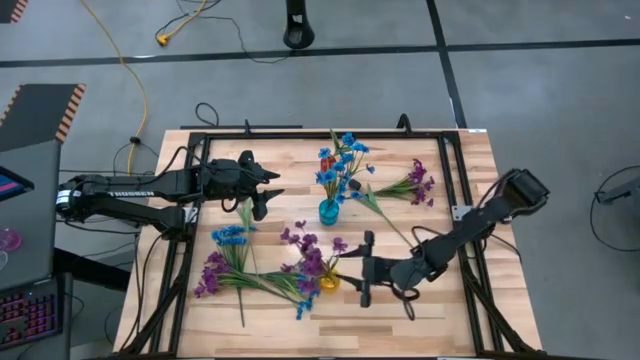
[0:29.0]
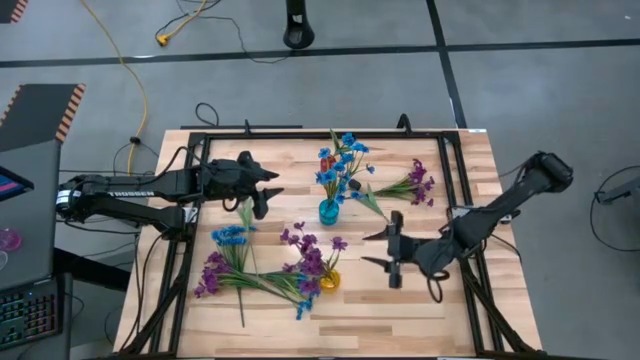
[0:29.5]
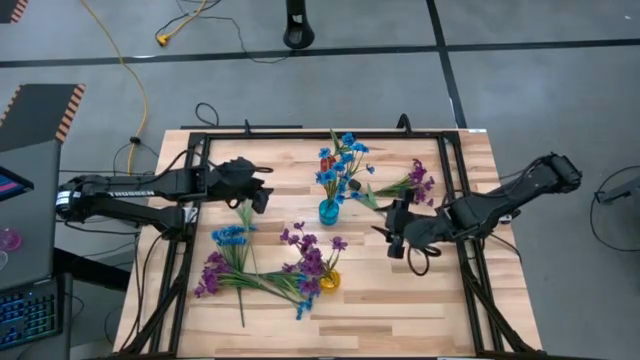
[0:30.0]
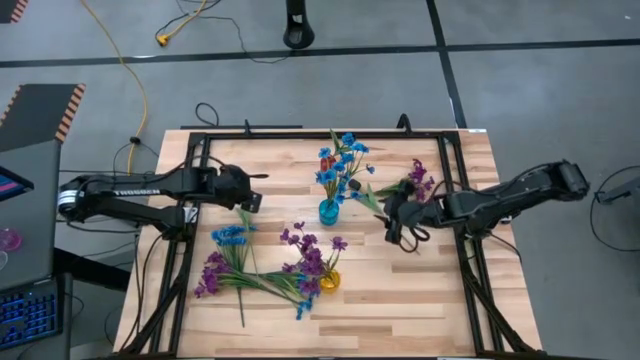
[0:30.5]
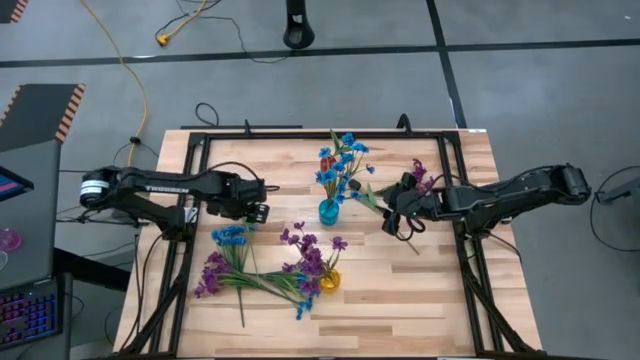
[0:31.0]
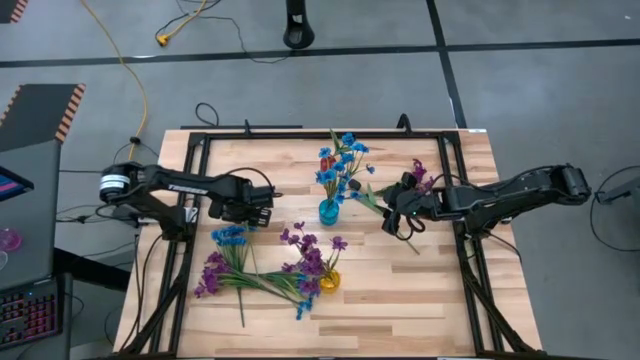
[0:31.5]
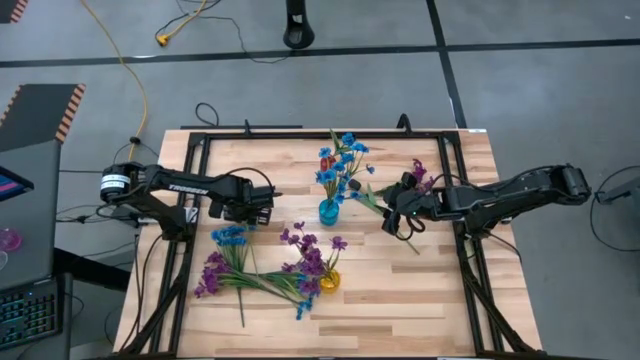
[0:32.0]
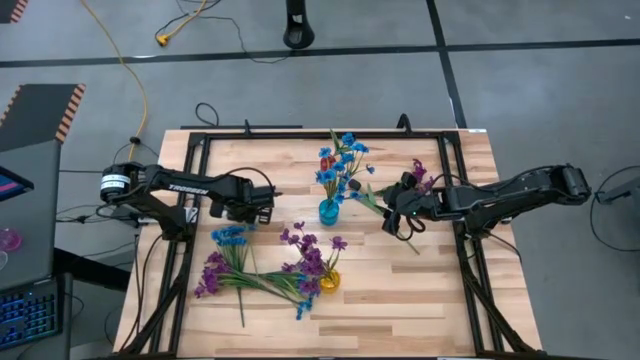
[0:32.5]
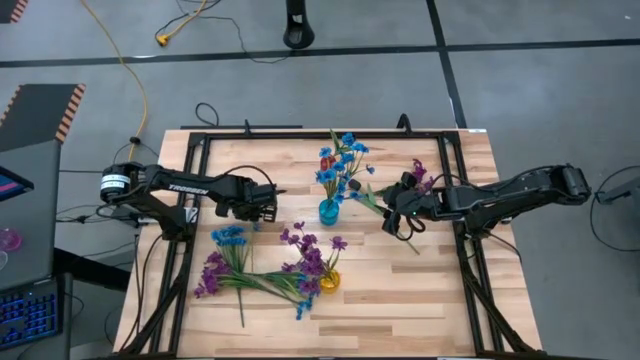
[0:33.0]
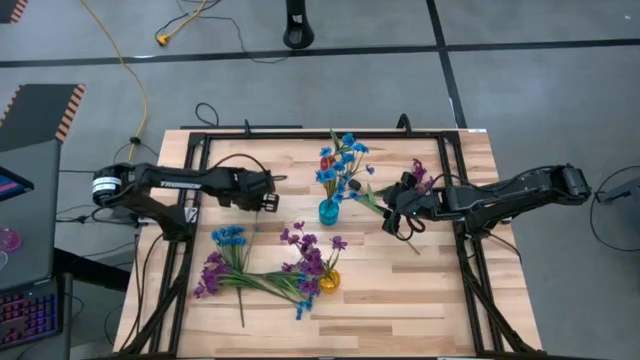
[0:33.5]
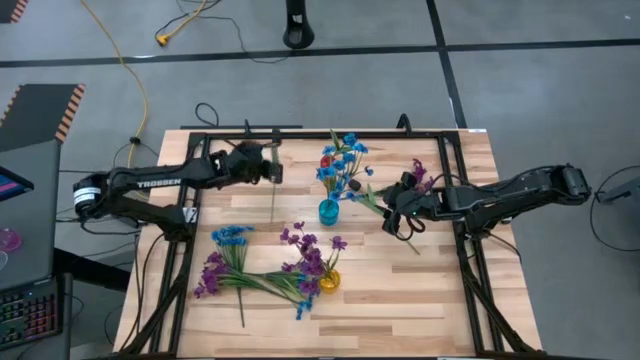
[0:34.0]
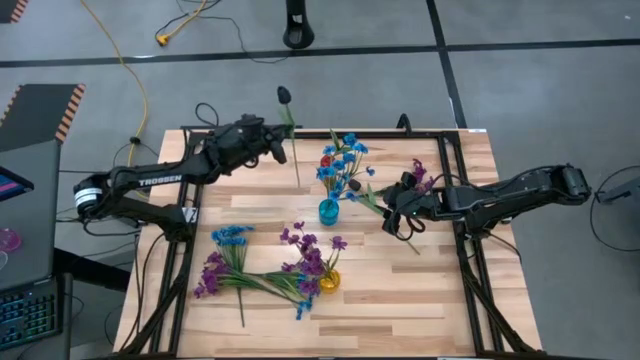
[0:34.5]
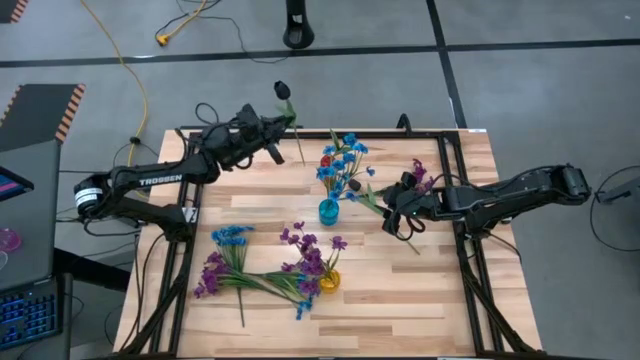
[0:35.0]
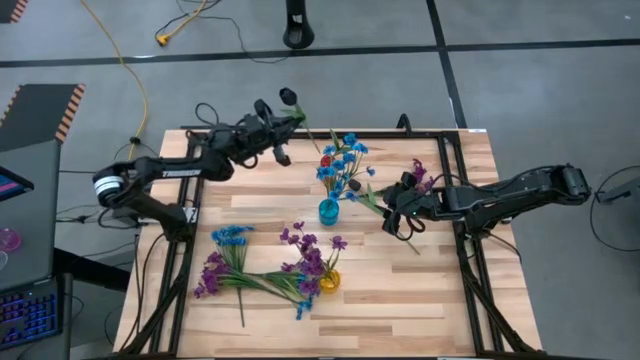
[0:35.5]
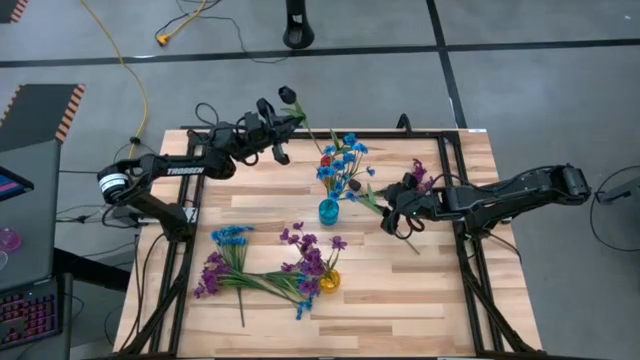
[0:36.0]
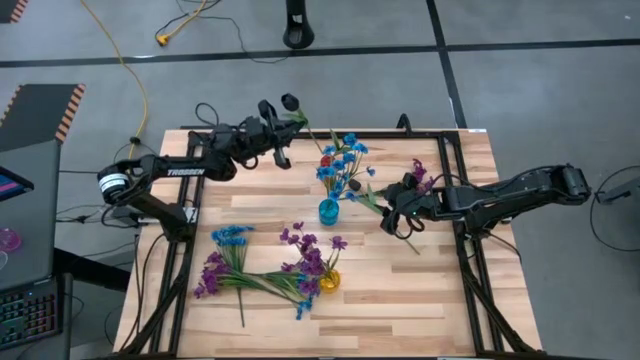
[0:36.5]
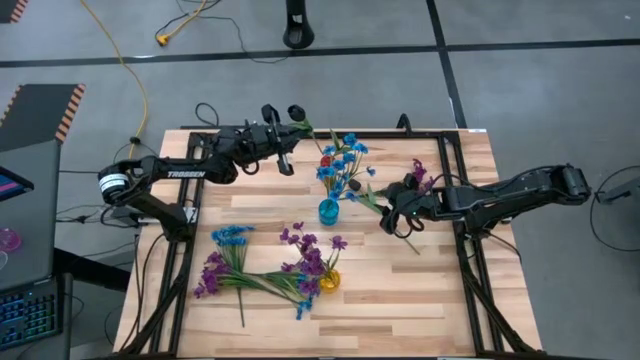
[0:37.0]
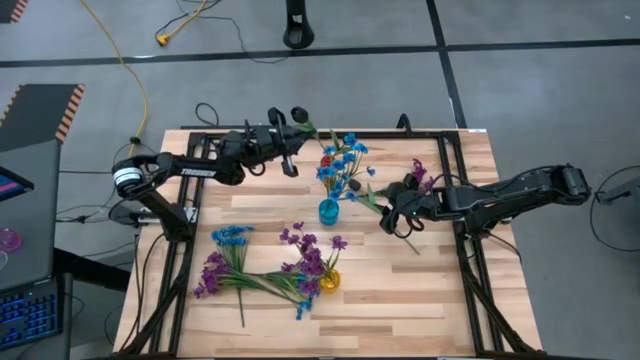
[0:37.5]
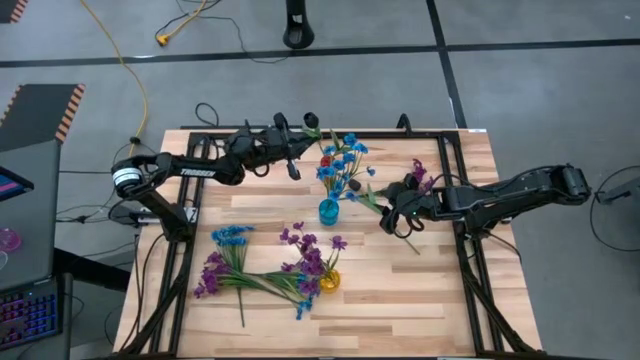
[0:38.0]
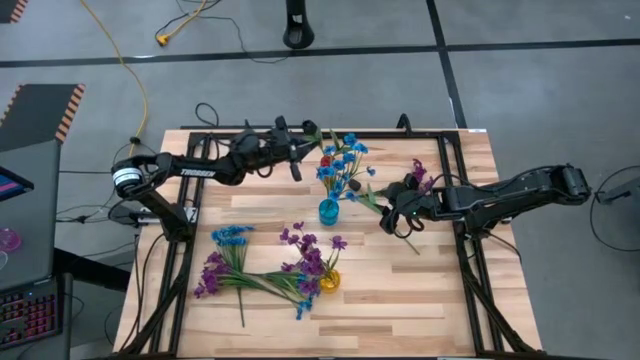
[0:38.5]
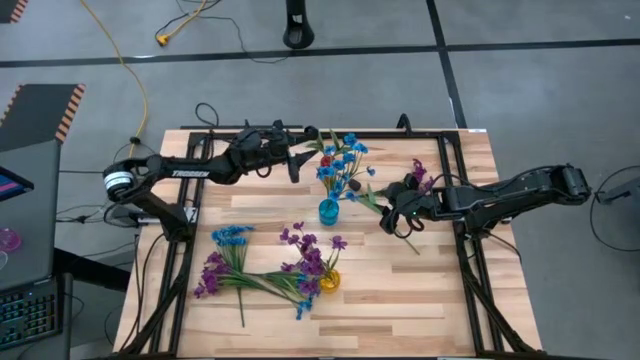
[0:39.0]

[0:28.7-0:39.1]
Task: Sort flowers into vase by color
Put the left black flower into the red crystal vase

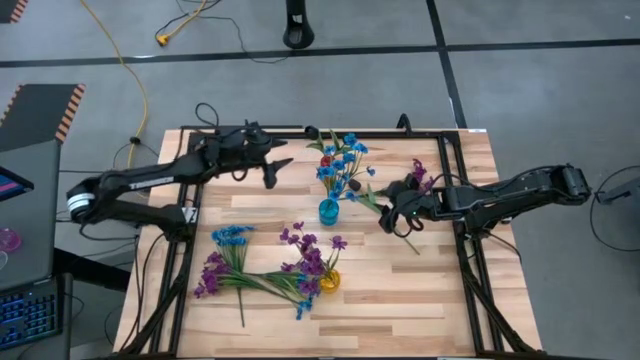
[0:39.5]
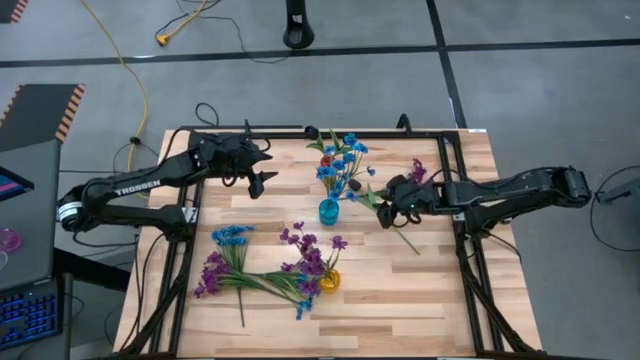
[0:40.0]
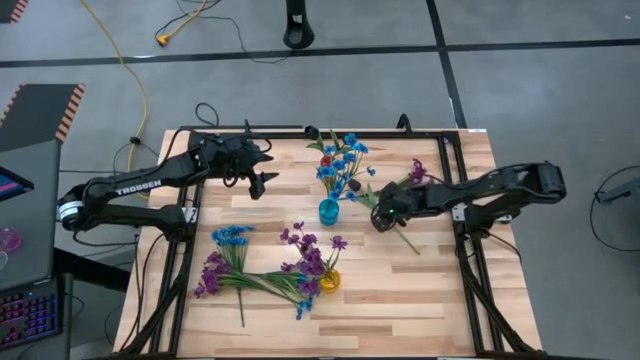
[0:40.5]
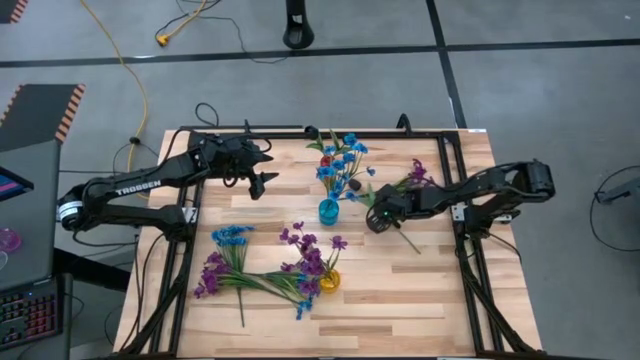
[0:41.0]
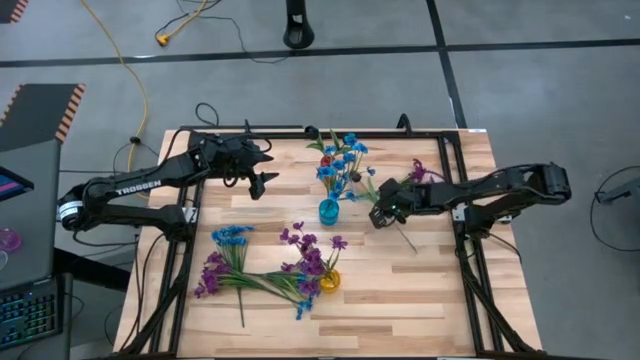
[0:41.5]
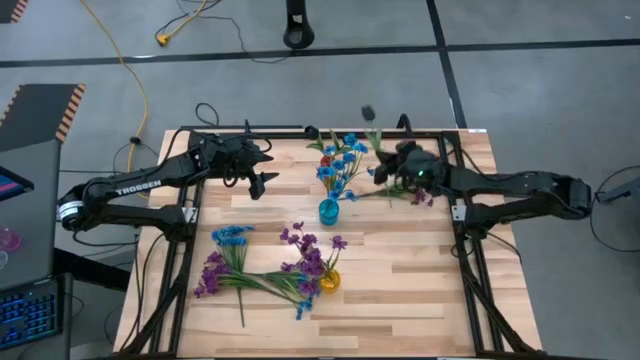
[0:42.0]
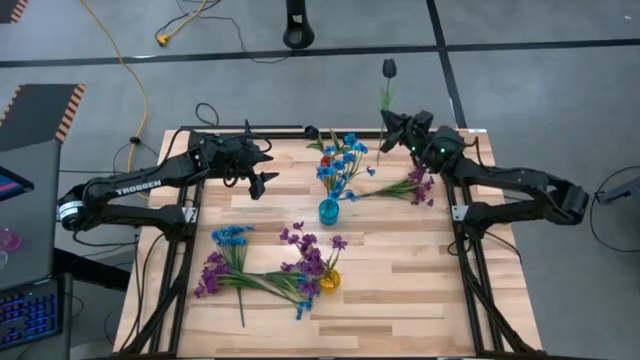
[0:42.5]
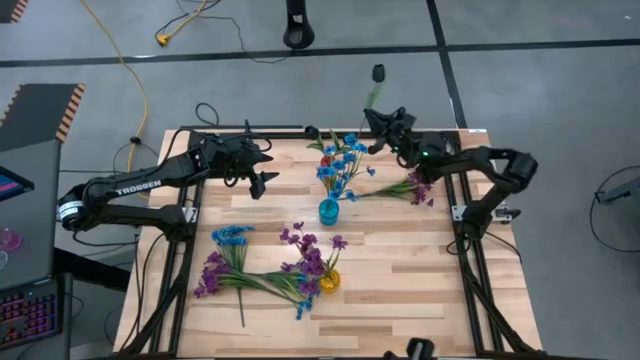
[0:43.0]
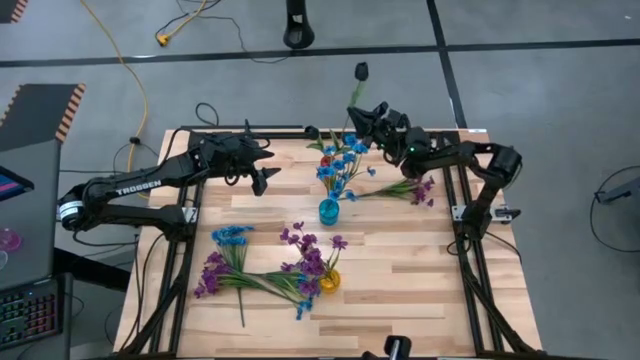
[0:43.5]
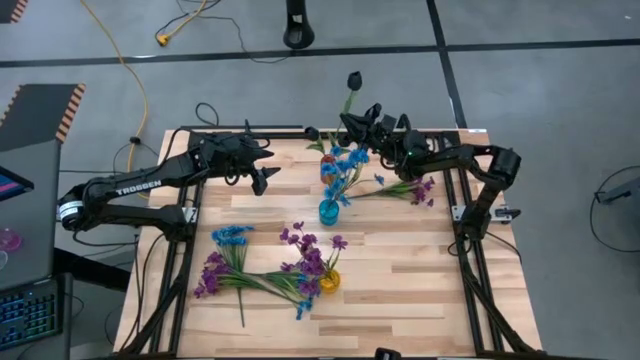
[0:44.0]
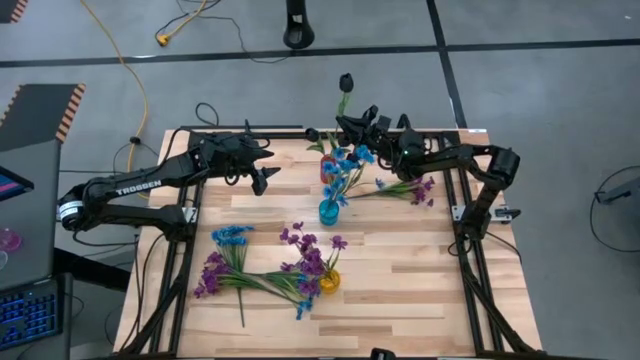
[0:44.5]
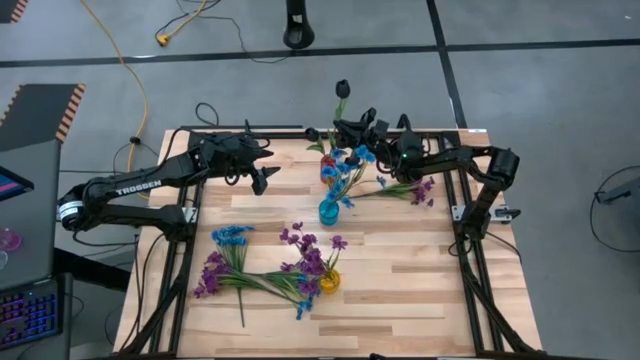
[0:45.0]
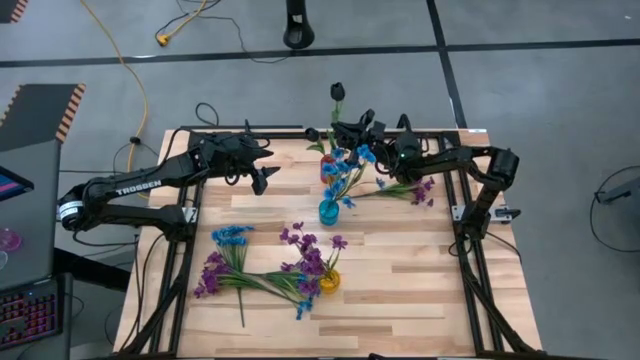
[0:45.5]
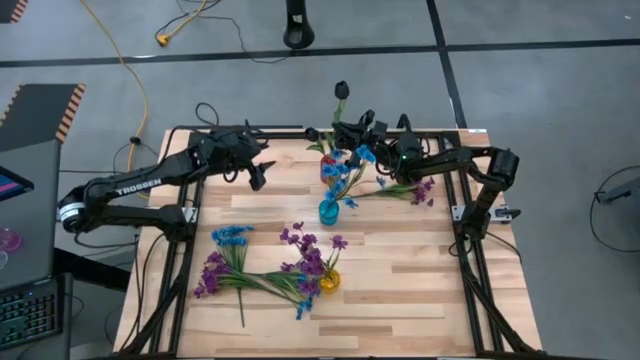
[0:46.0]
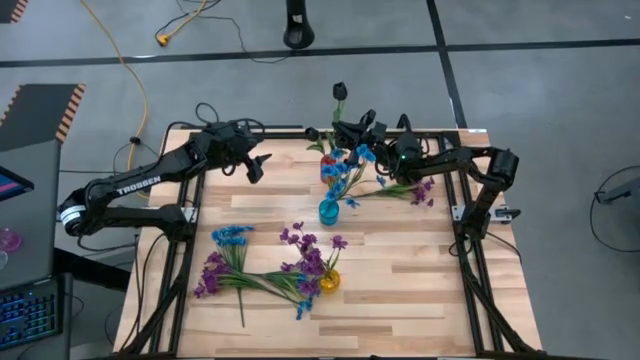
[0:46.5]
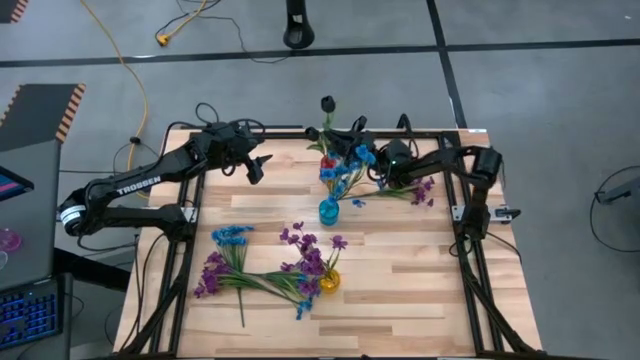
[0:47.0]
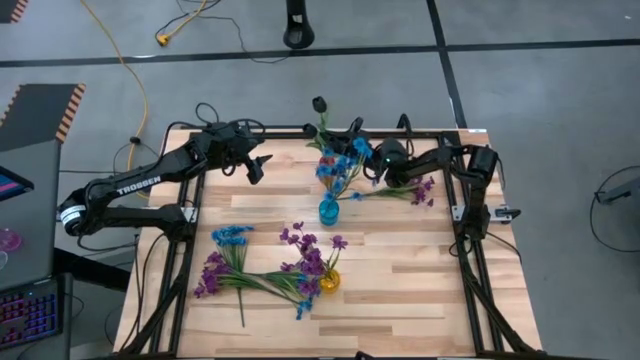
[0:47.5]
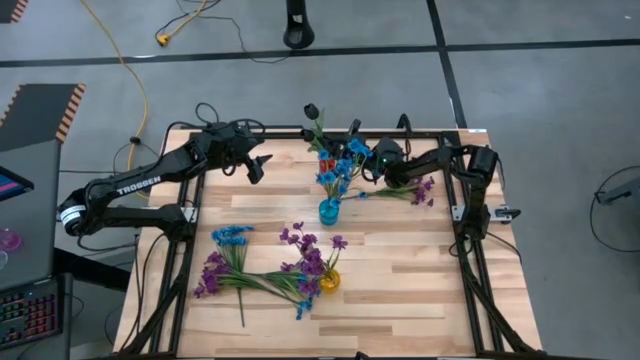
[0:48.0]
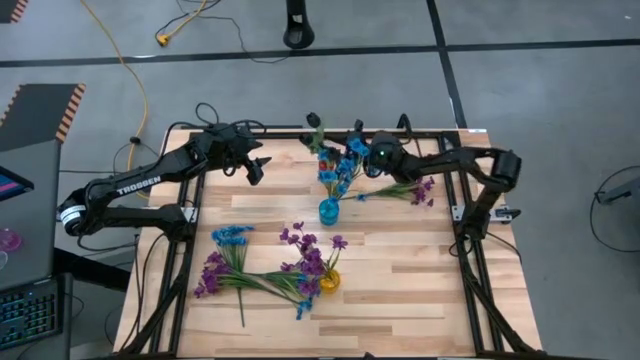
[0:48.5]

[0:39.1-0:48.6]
Put the black flower into the red crystal vase

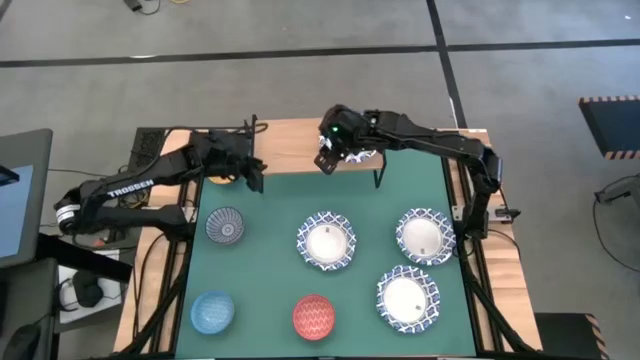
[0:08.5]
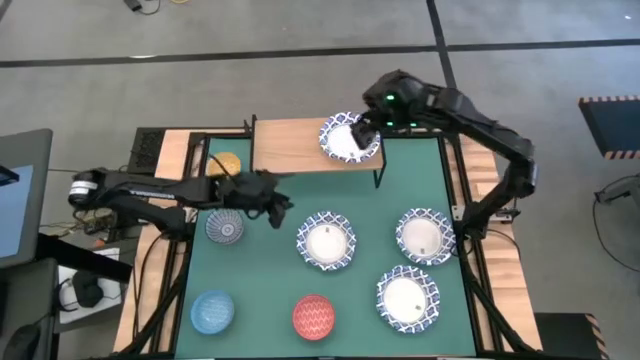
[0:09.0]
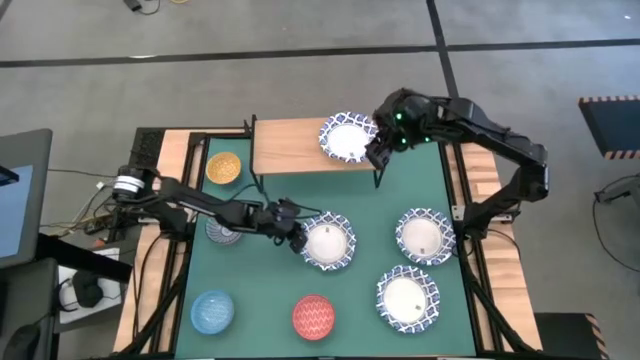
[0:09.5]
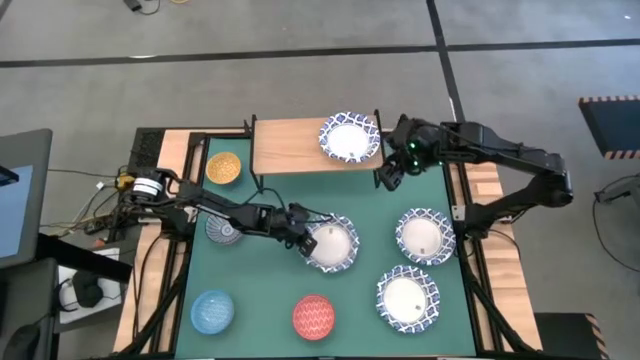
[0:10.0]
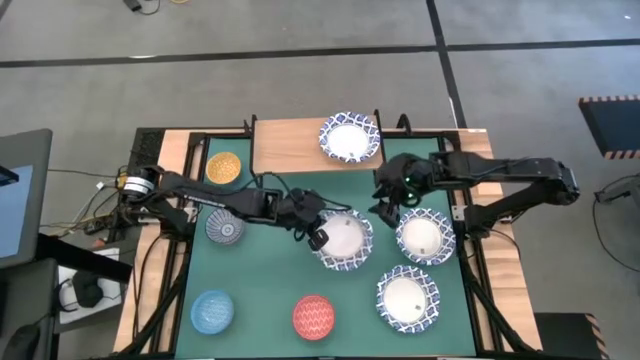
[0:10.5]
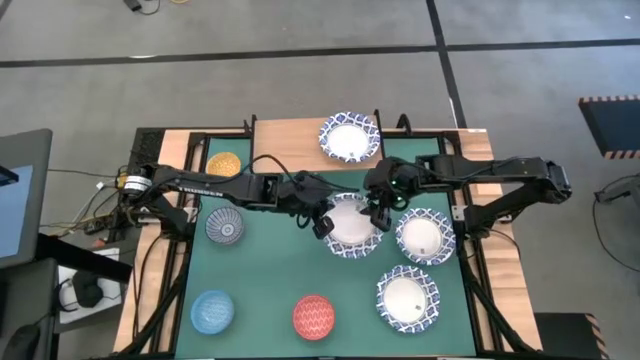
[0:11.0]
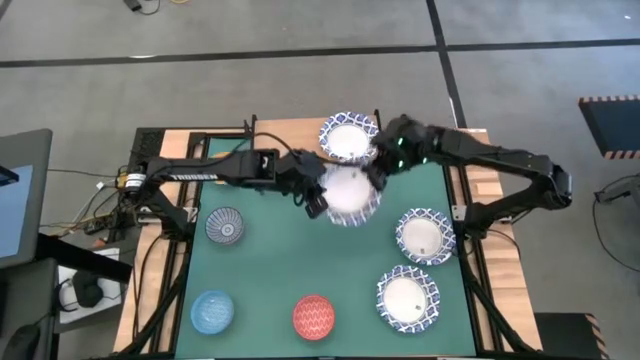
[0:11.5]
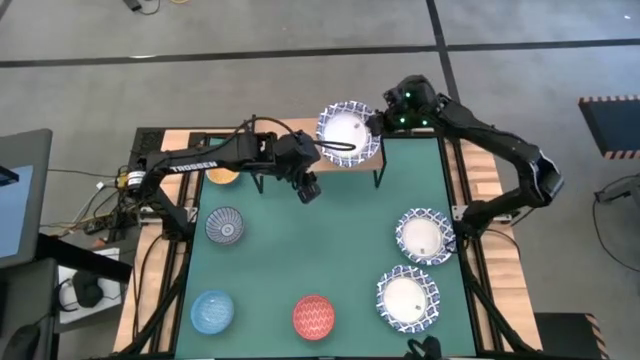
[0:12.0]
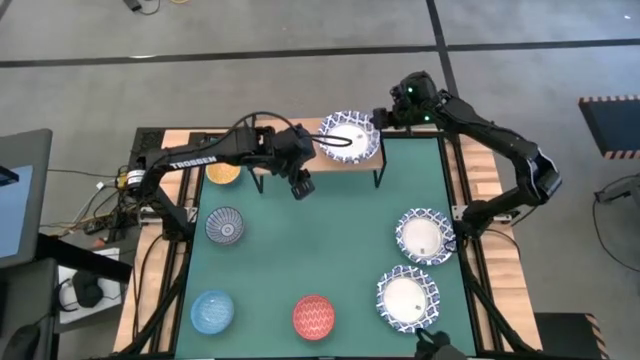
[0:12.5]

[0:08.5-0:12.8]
Task: Place and stack bowls onto a shelf
Stack the top left white bowl on top of the other white bowl on the shelf
